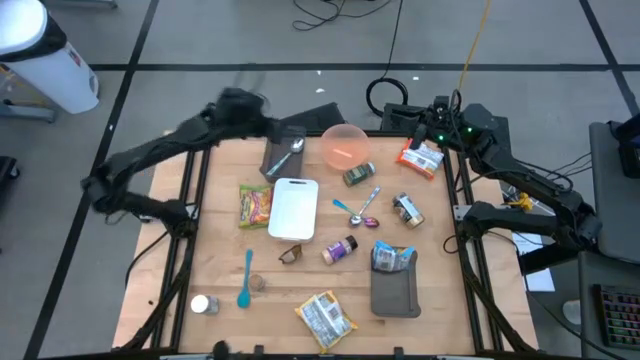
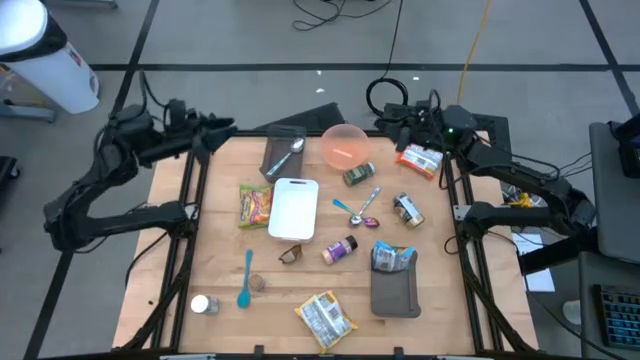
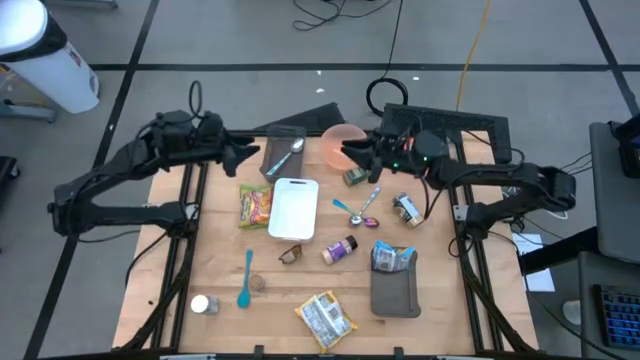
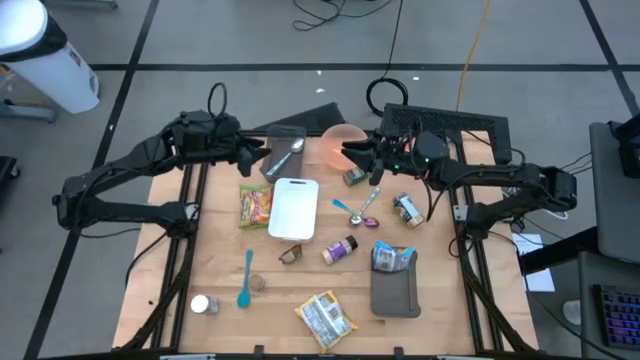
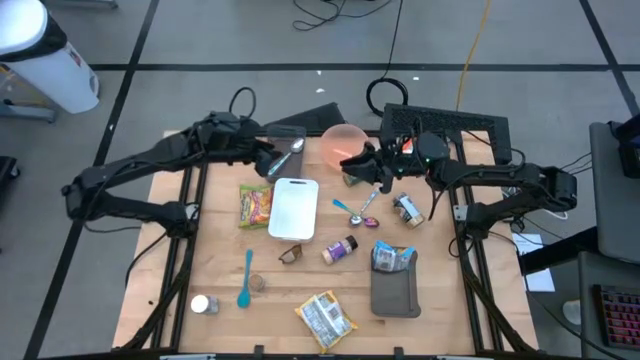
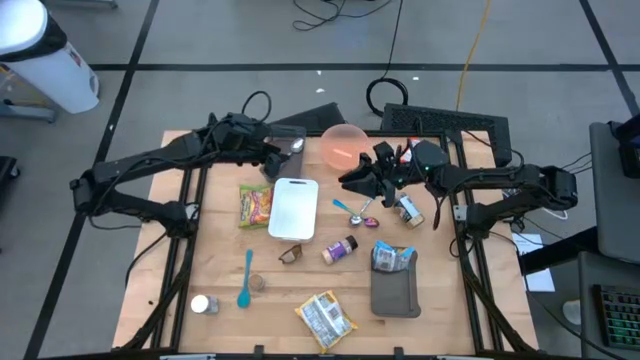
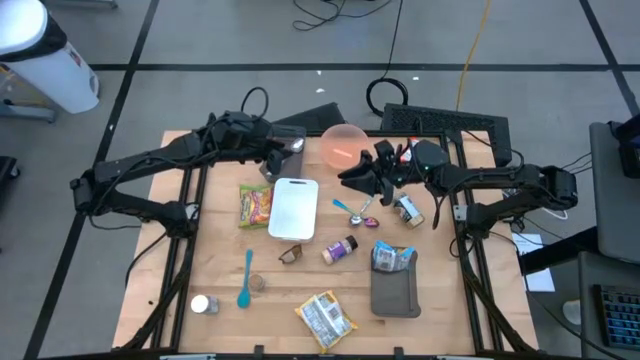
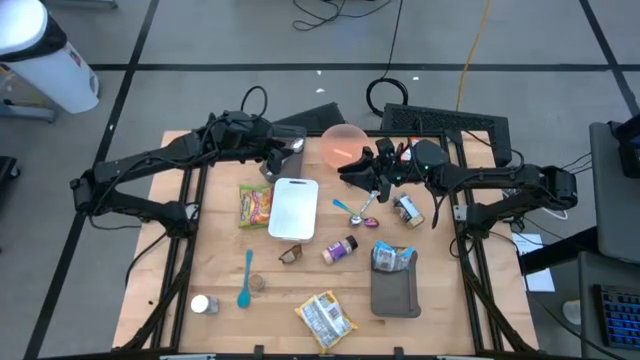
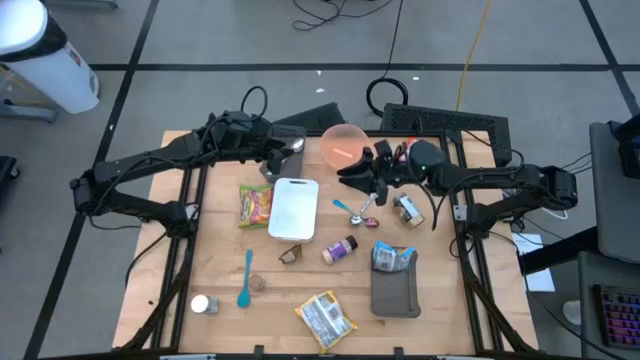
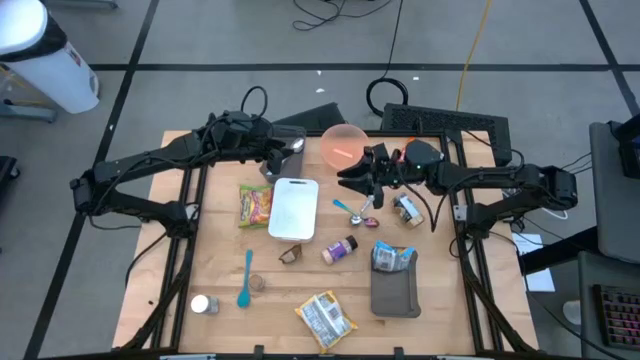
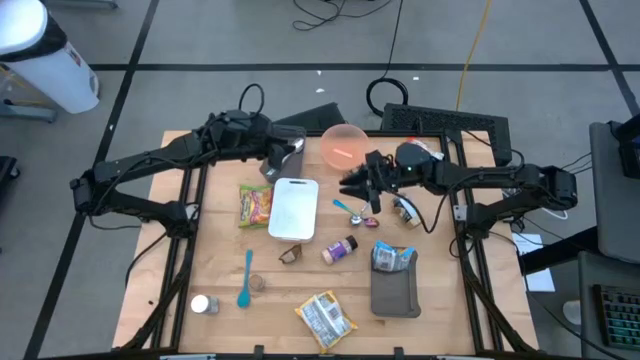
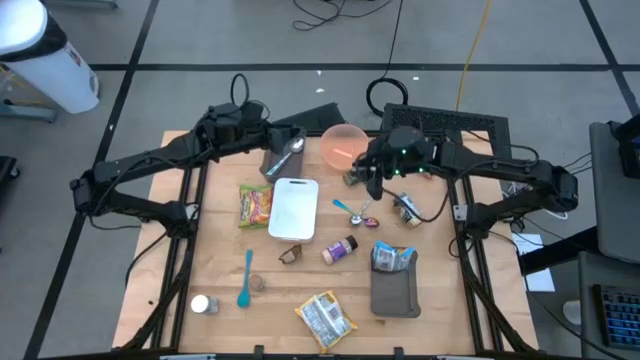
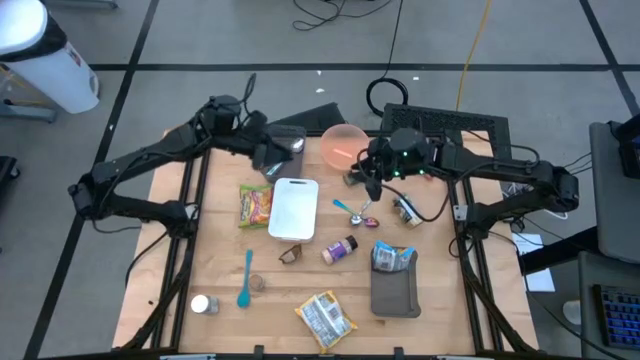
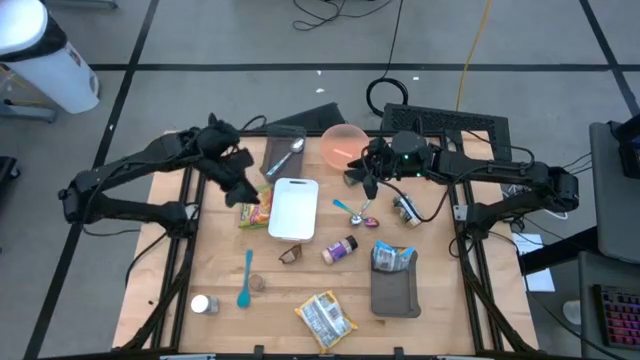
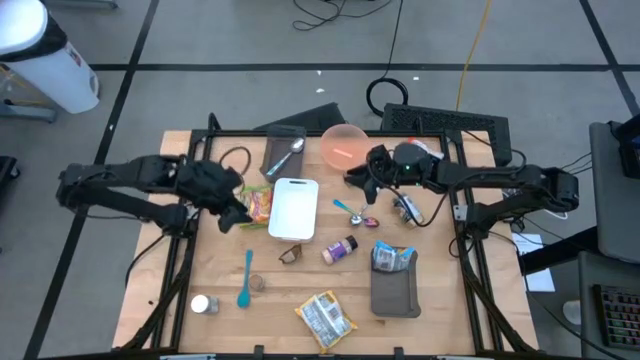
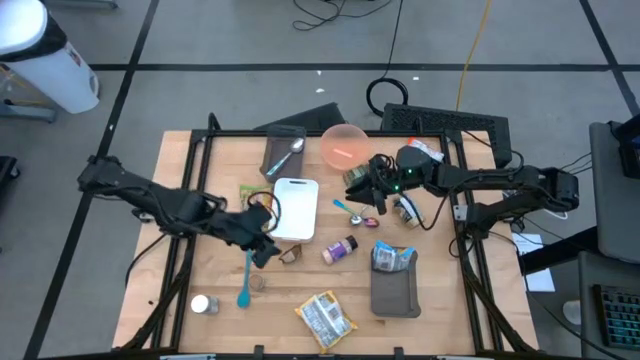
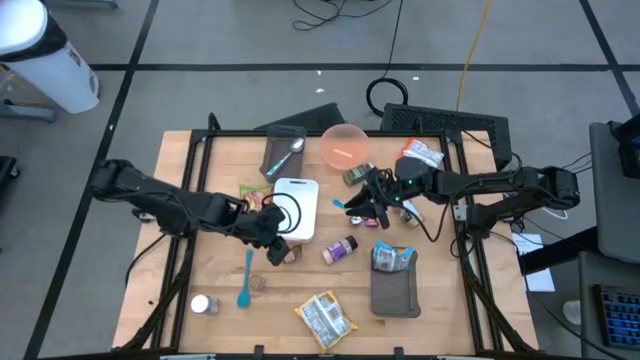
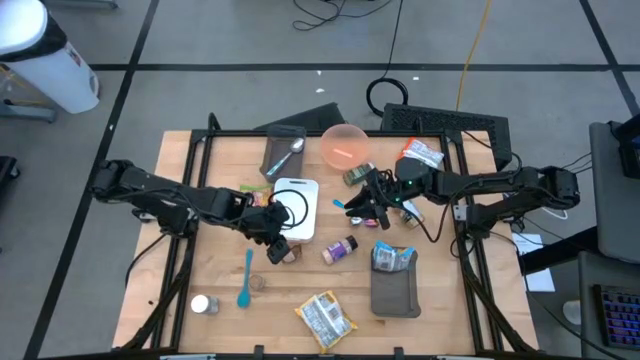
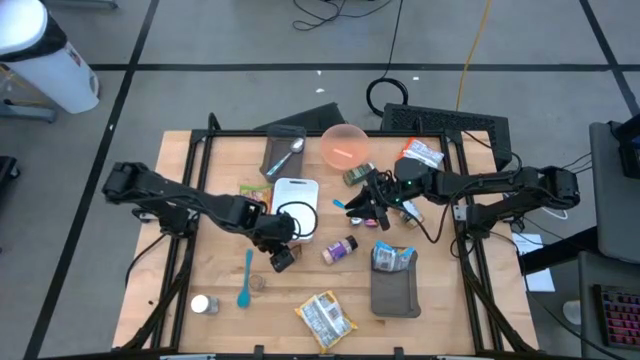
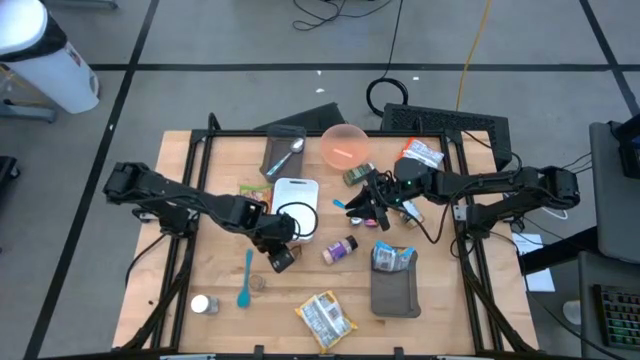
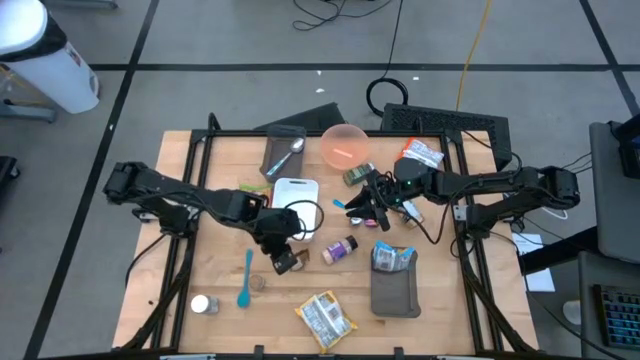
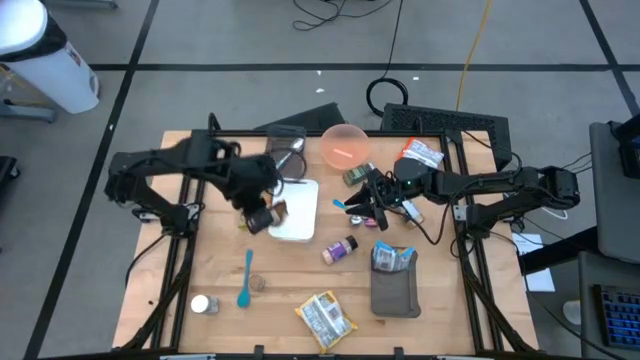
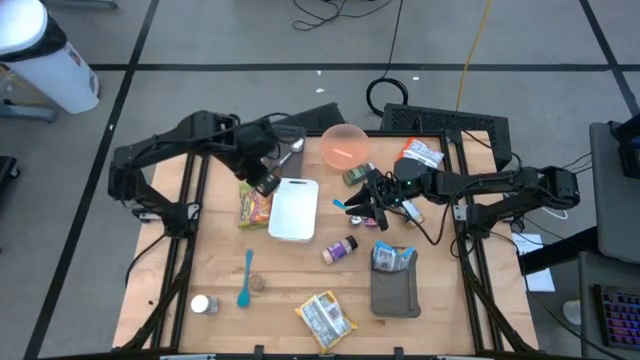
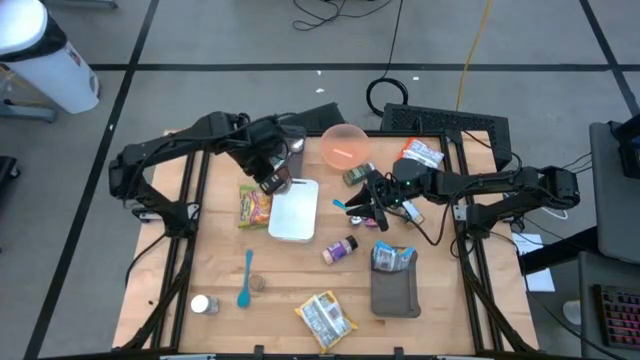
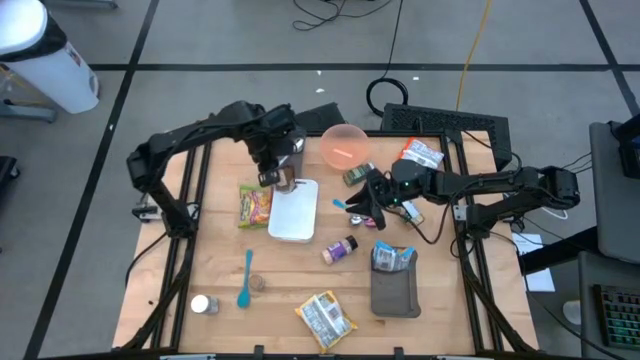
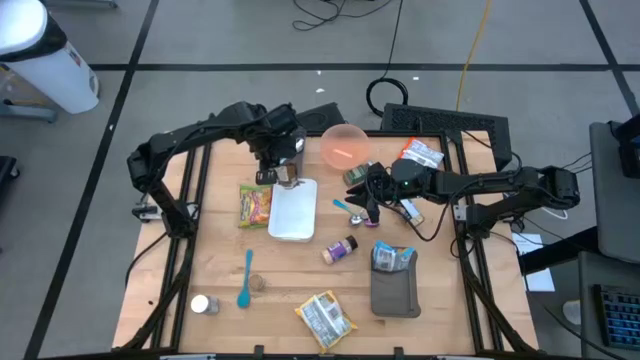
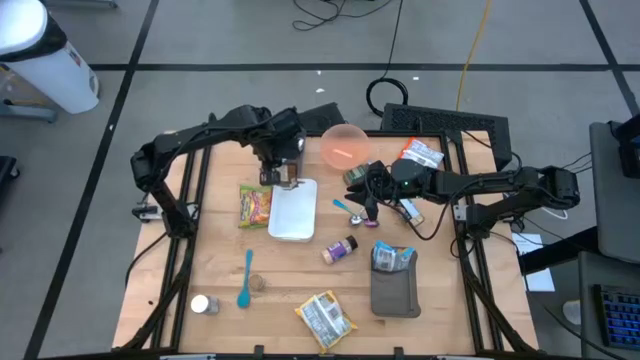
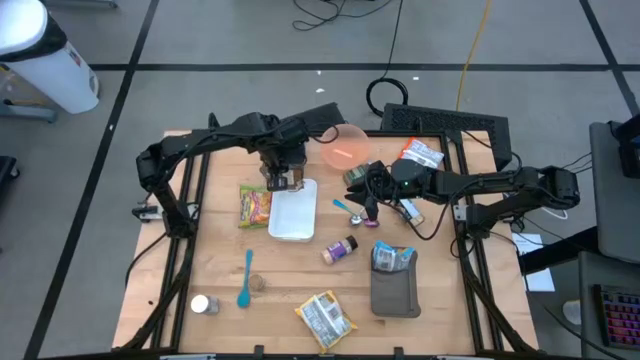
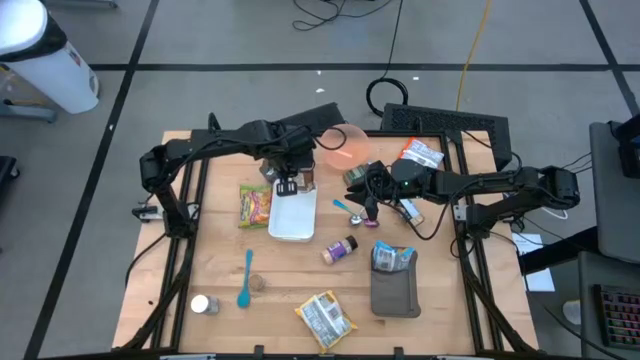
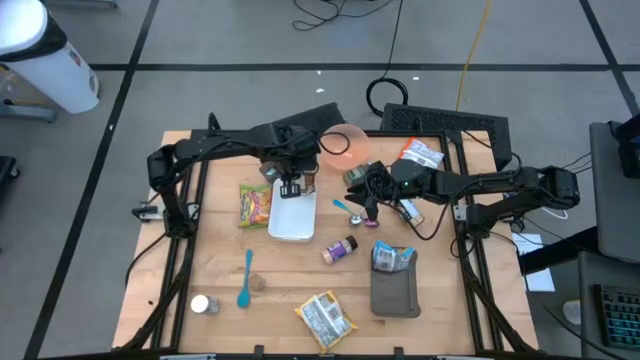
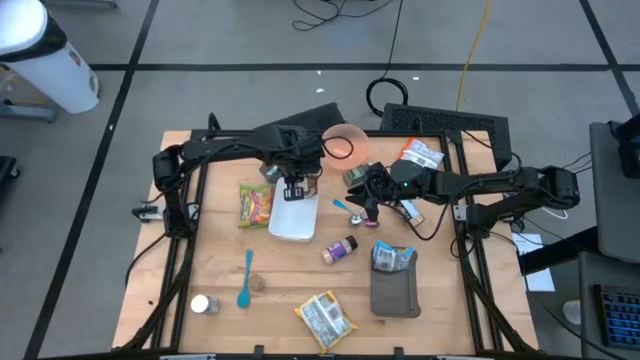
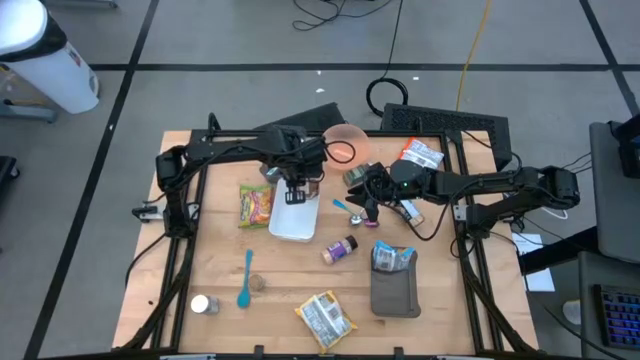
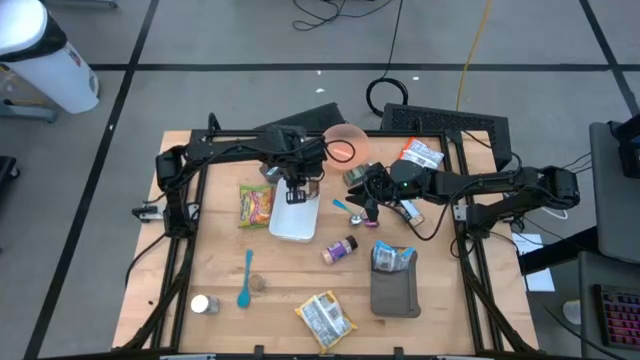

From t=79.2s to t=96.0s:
Task: Pick & Place Food Item
Put the orange seasoning pack into the white bin

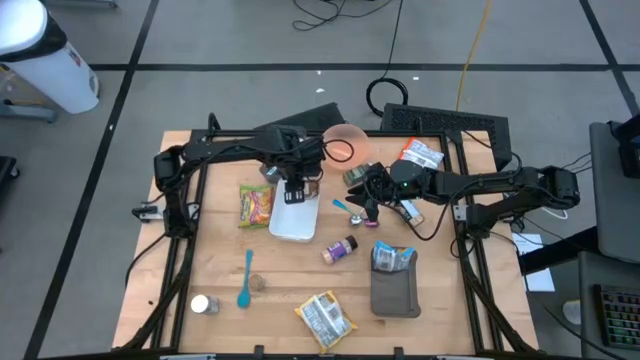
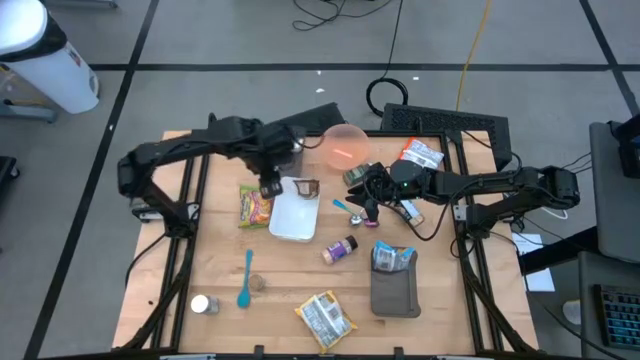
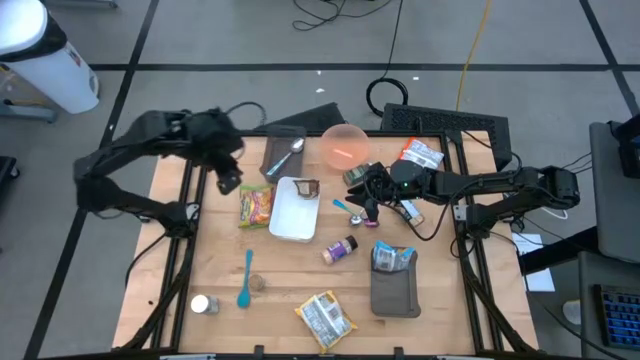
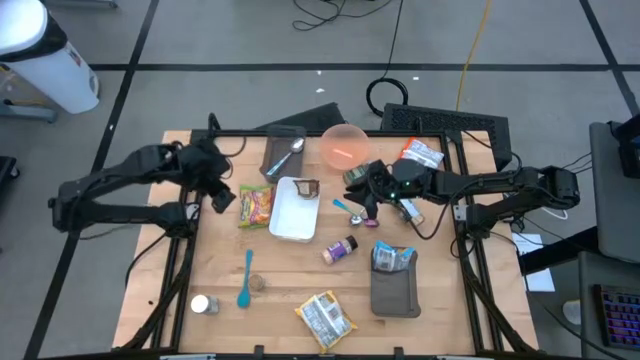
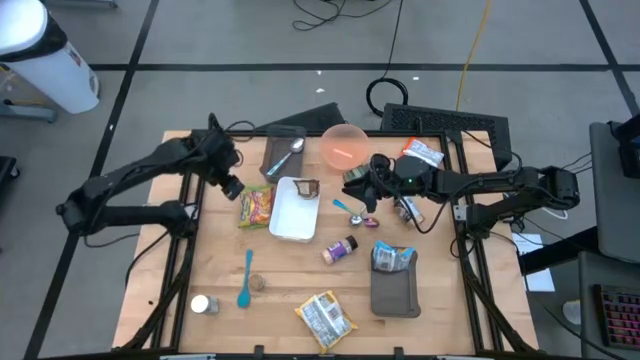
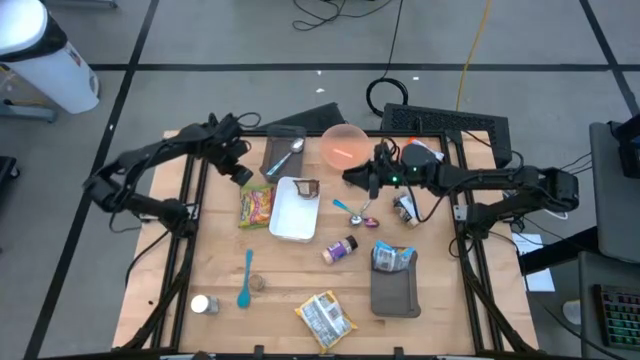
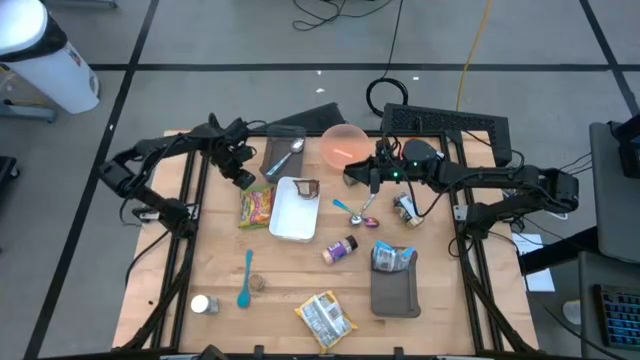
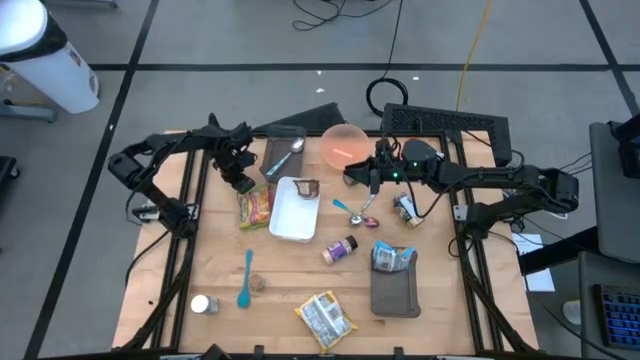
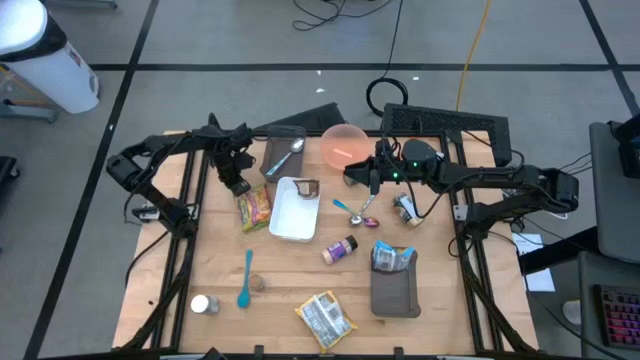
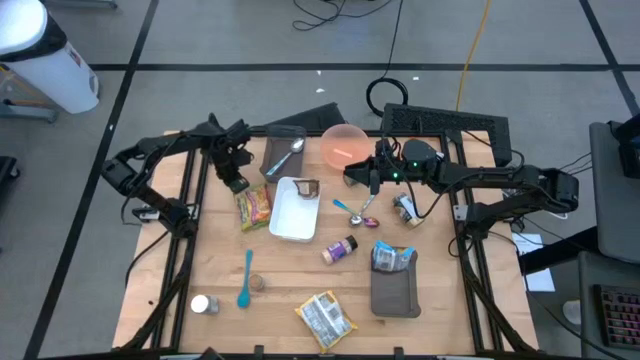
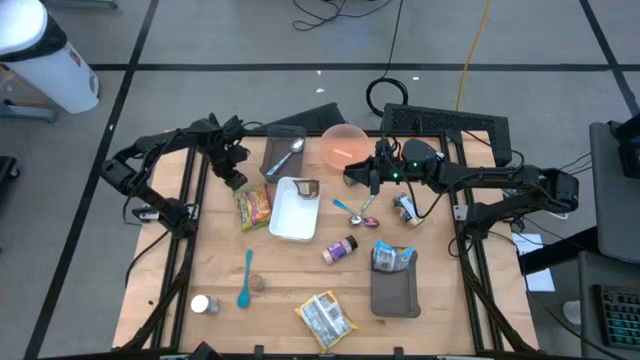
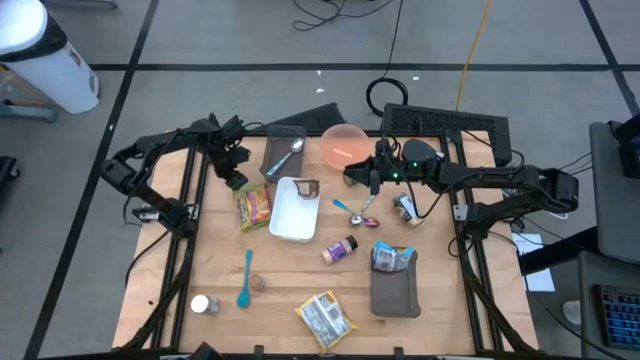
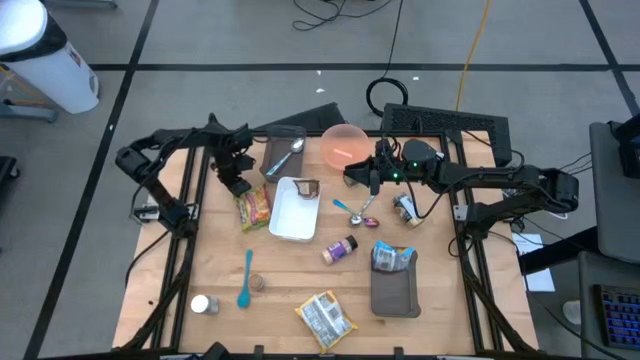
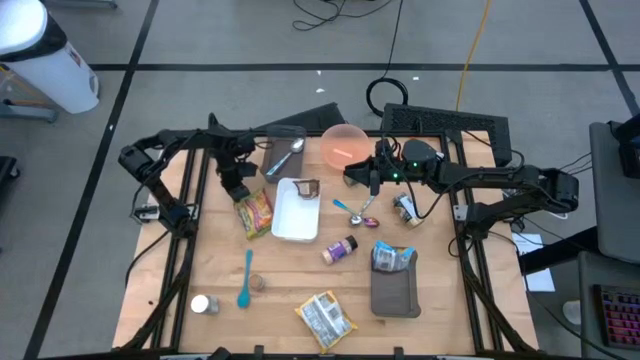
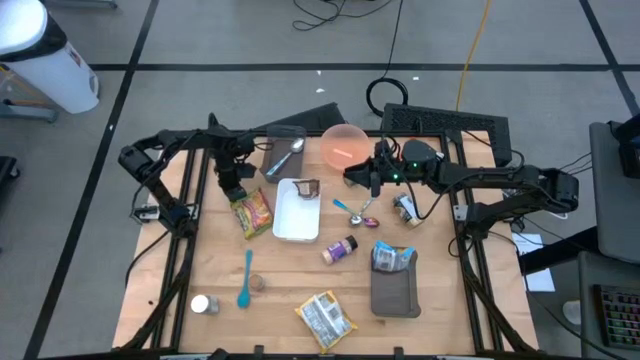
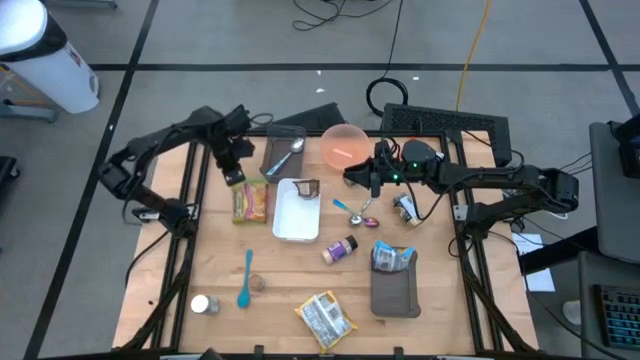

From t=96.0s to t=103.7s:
Put the green noodle pack into the bottom black transparent bin
